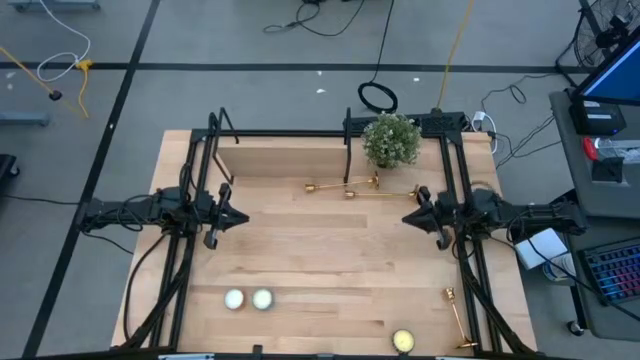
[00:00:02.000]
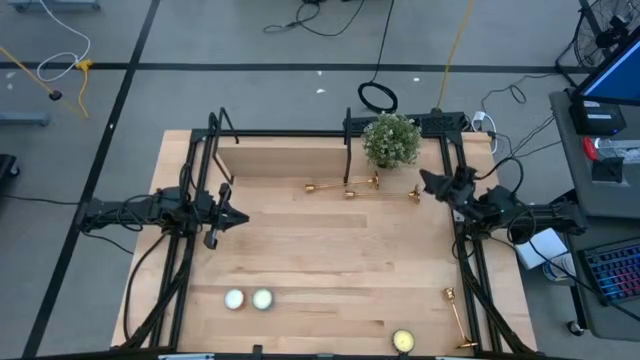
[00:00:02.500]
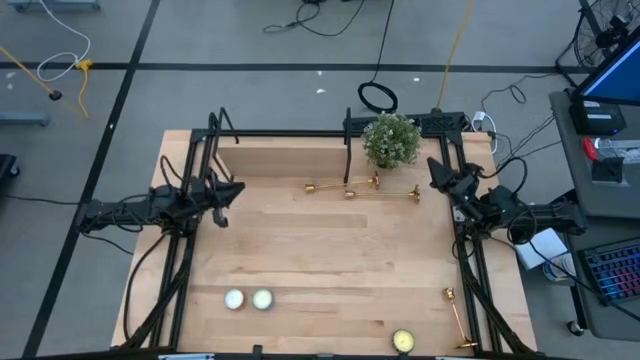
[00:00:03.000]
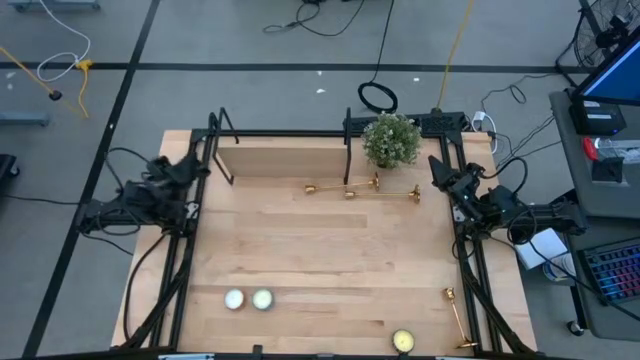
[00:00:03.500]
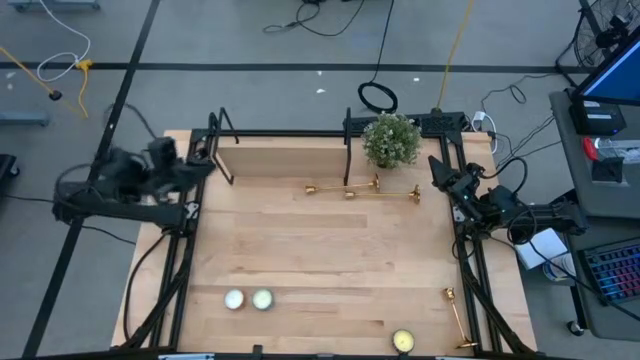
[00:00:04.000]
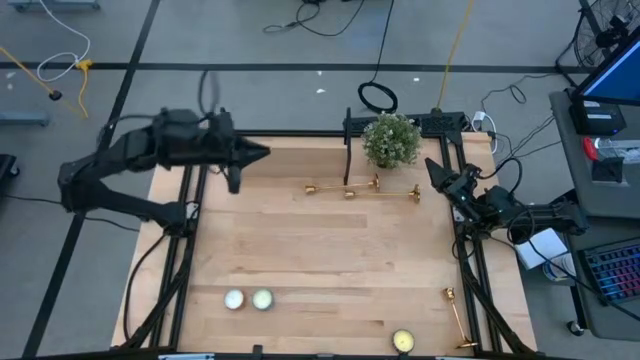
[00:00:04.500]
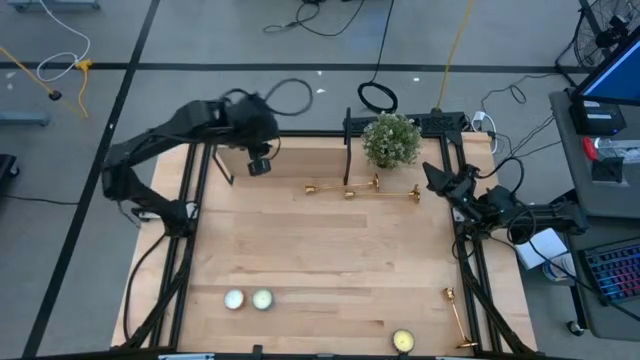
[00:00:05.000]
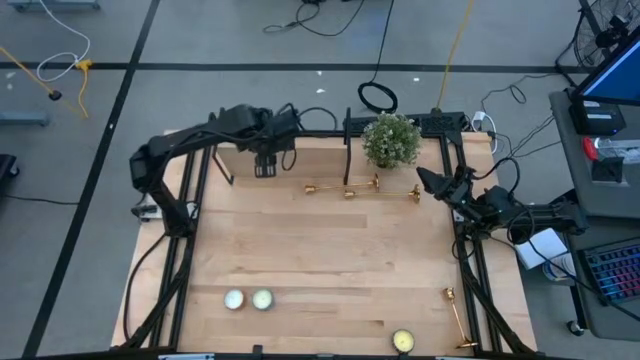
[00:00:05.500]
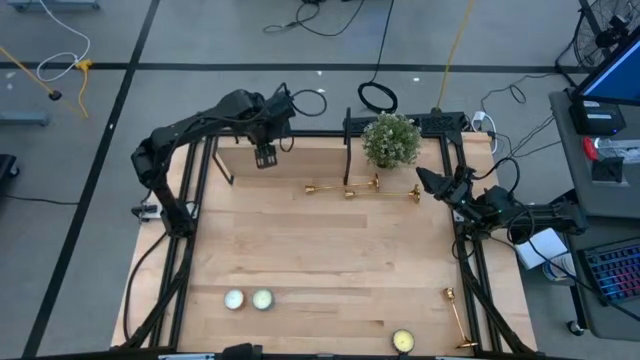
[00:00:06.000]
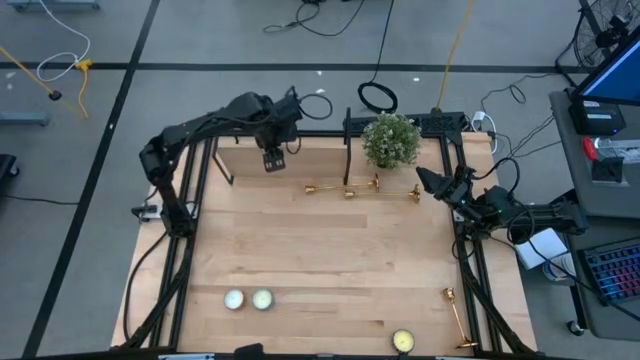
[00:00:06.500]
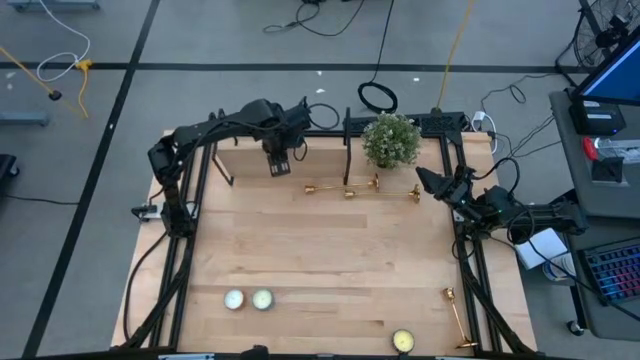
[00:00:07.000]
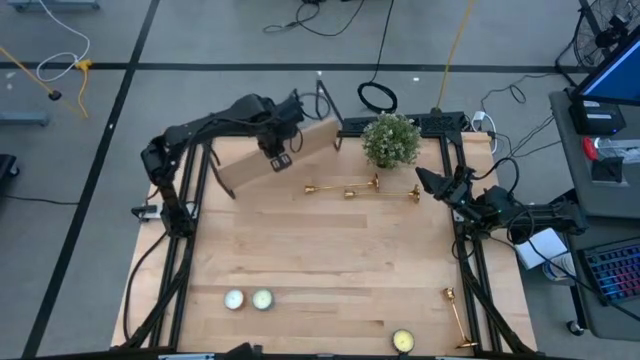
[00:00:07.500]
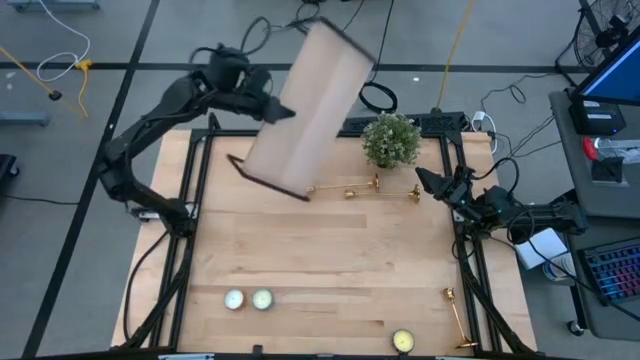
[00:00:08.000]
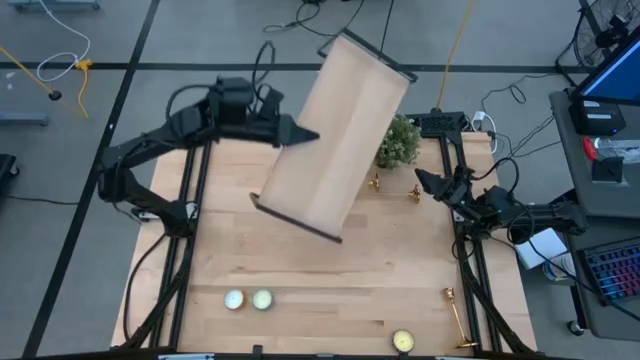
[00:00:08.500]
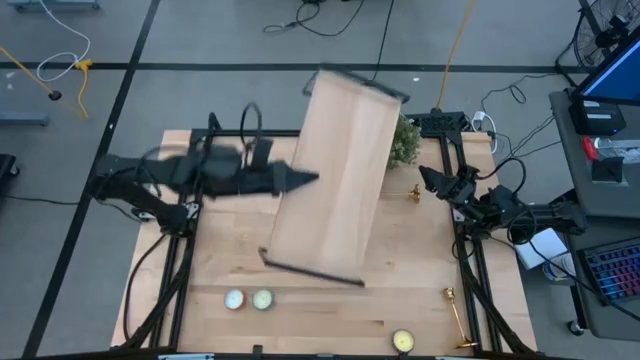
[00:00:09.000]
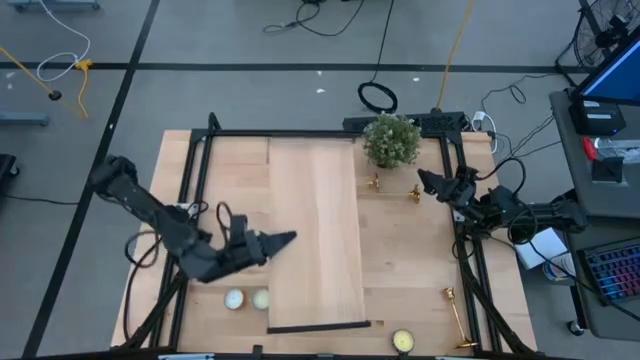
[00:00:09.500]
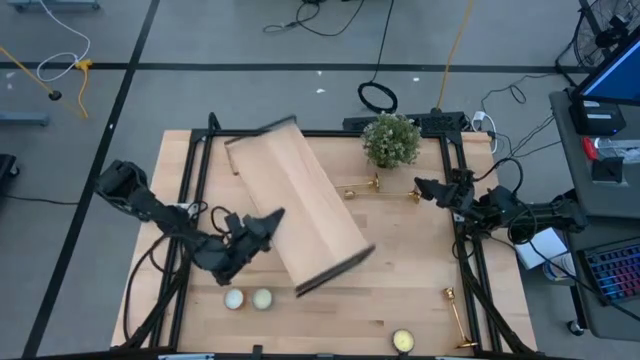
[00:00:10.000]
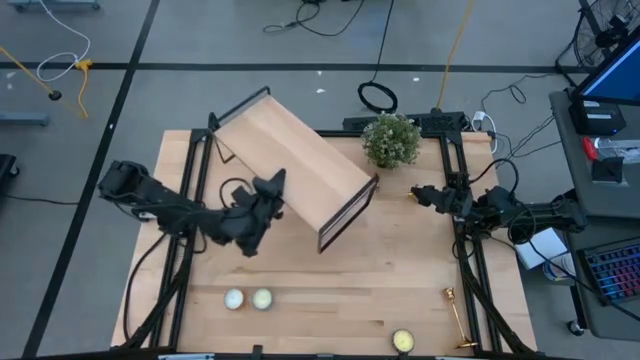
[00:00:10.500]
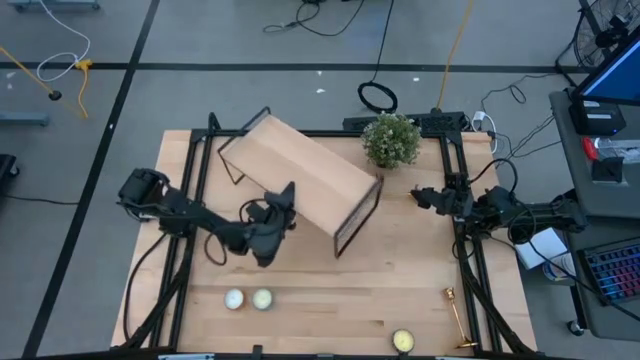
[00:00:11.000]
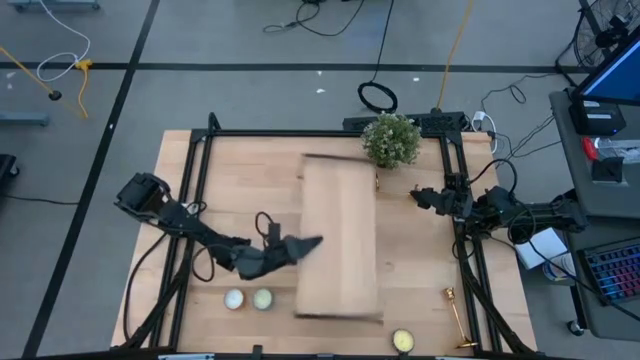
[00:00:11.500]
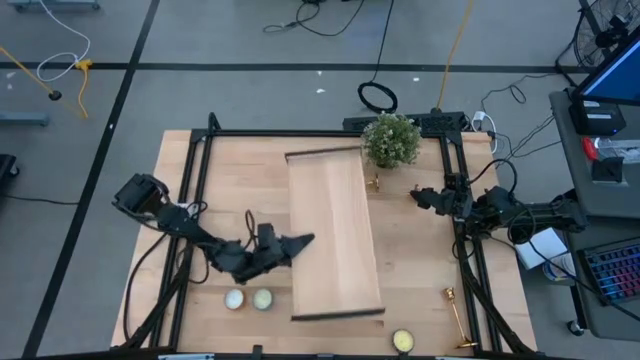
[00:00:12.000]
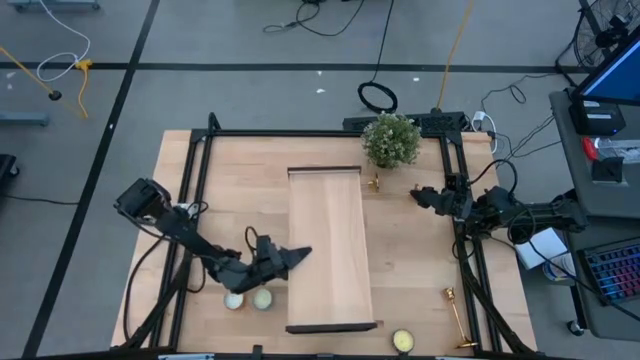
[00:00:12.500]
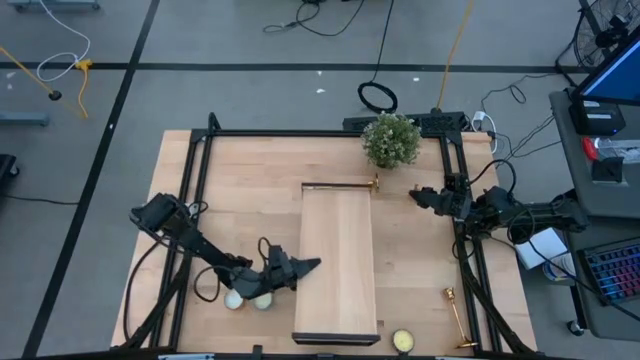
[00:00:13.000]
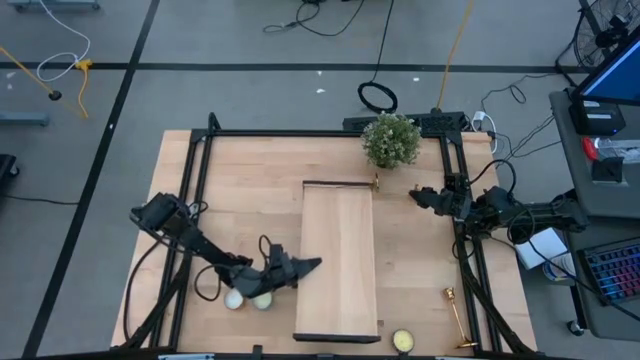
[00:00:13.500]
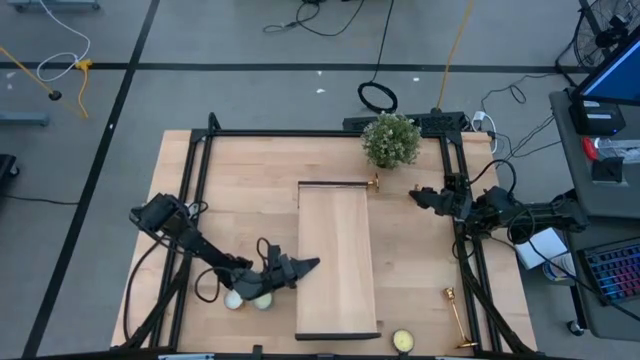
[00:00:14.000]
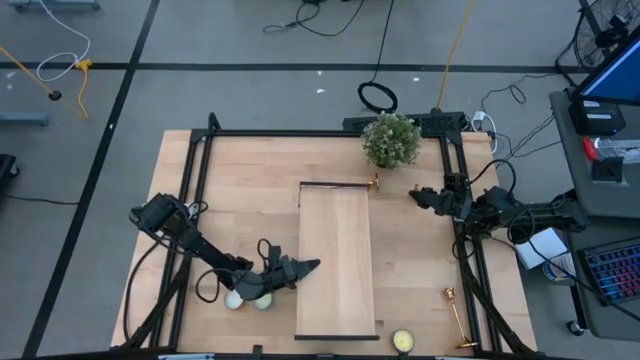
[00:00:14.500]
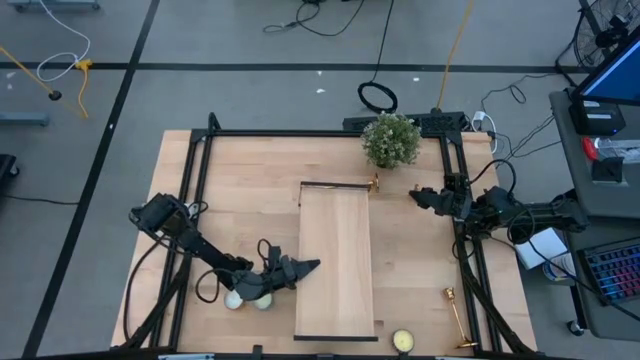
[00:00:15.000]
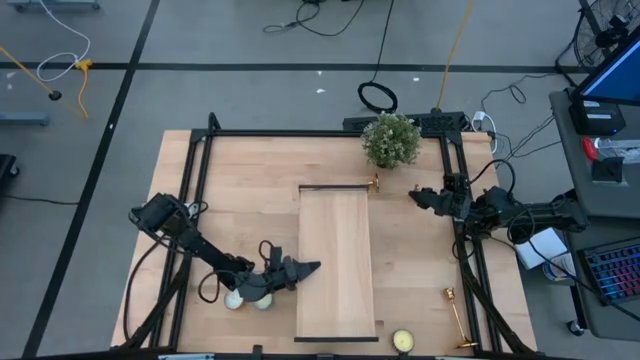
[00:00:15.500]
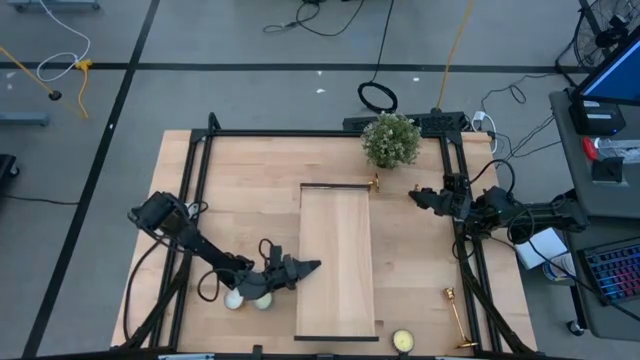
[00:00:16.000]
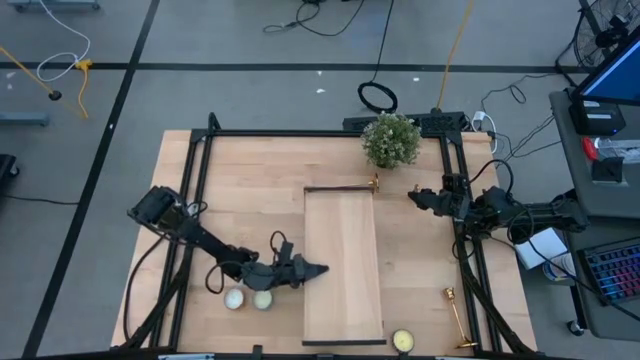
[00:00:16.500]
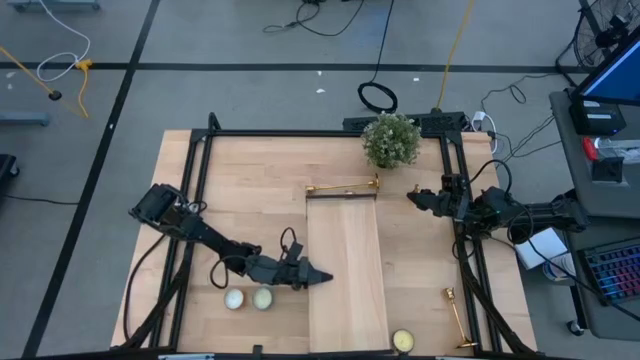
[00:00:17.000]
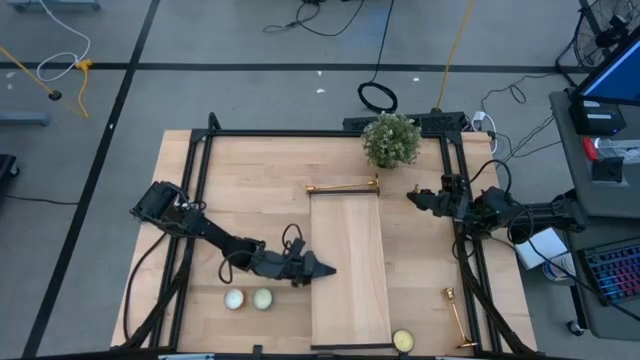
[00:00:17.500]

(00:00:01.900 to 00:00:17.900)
Task: Pick & Place candle stick holders
Prepare the shelf

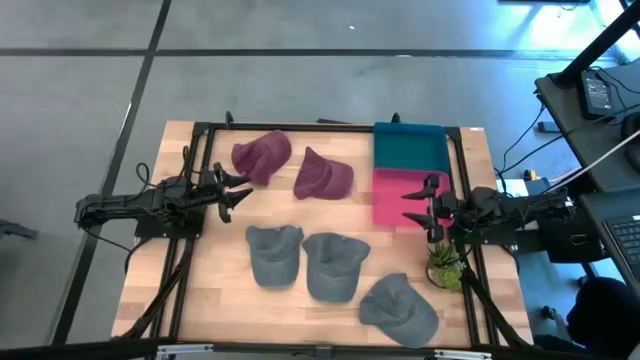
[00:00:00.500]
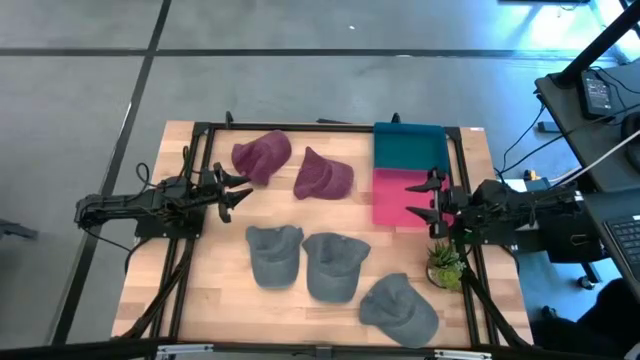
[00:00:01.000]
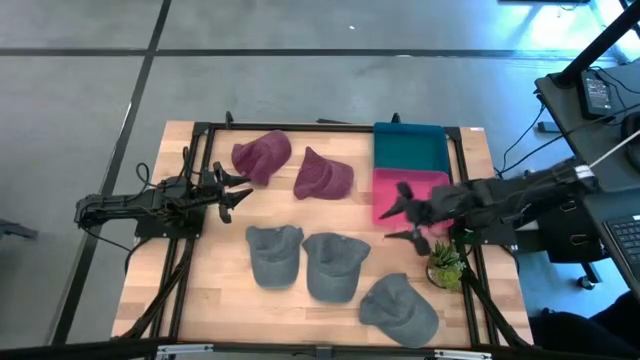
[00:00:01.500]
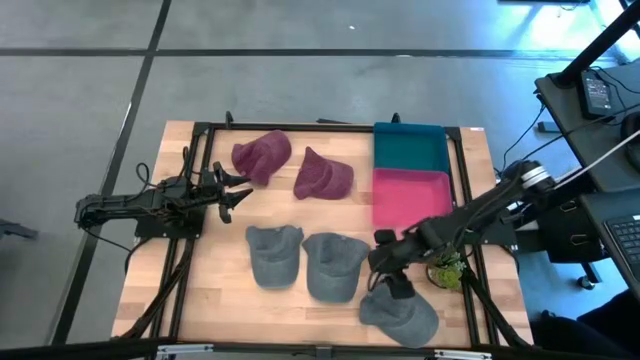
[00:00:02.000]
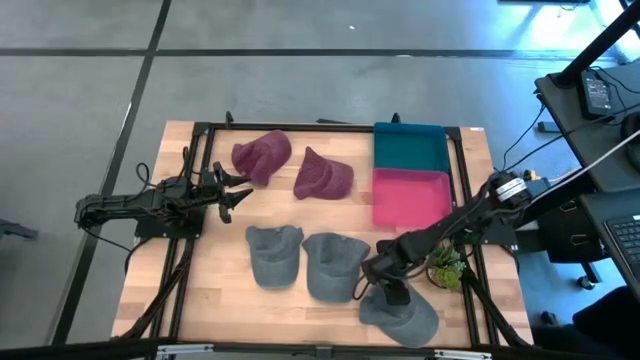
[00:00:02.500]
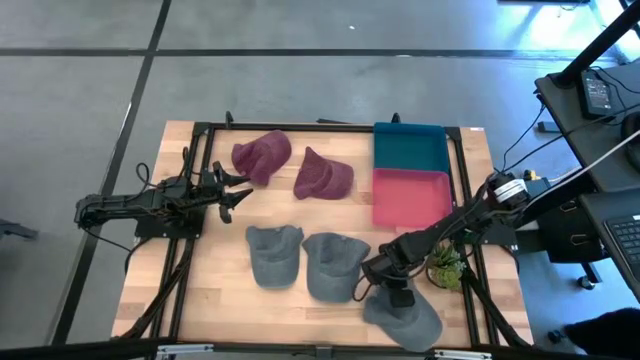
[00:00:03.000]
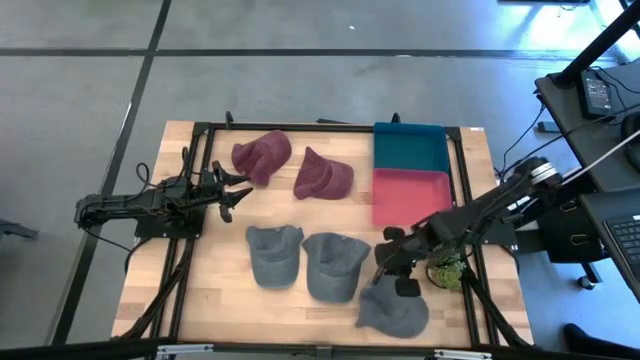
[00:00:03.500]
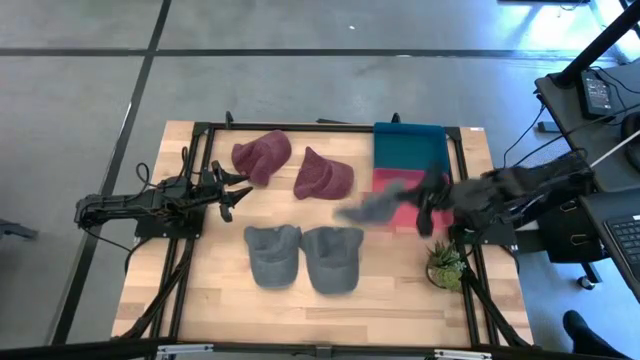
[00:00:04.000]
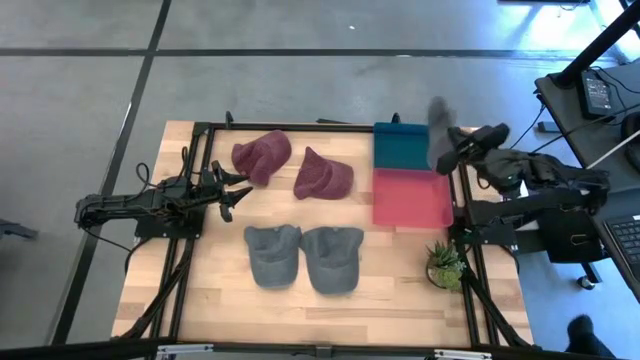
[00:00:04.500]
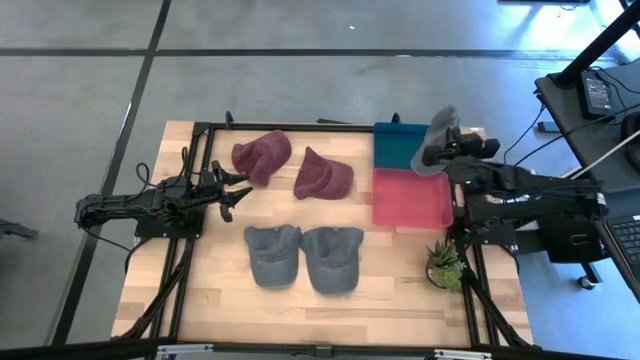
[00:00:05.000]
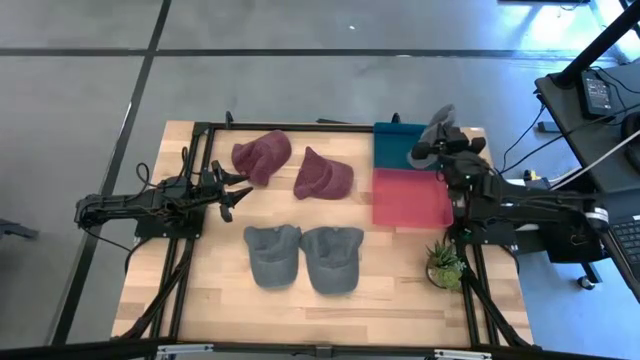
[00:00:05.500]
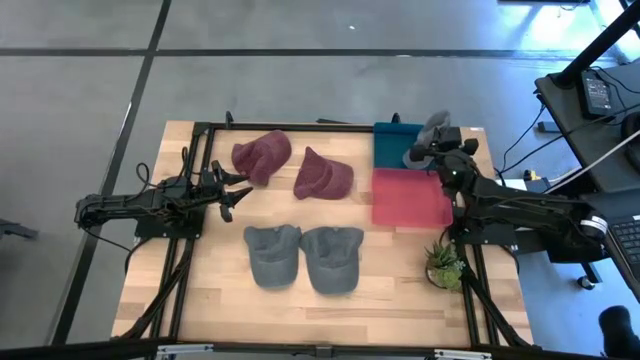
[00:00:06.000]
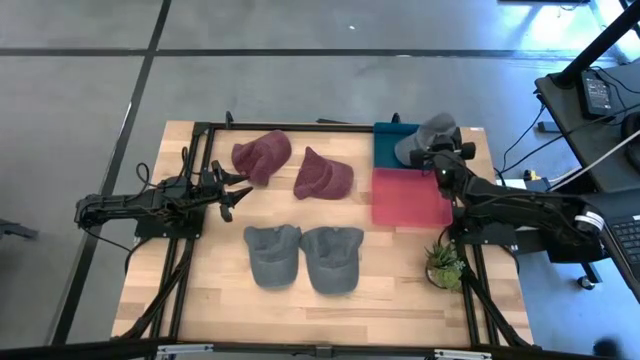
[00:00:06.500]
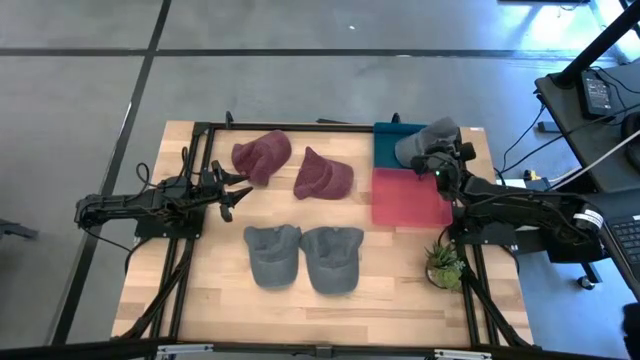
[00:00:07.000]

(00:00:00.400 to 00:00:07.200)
Task: Pick & Place hat
Put the right gray cap into the blue bin
